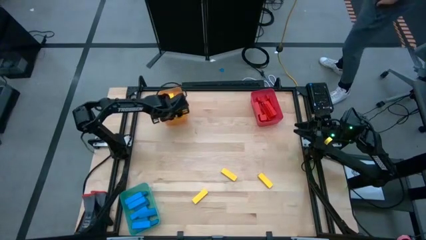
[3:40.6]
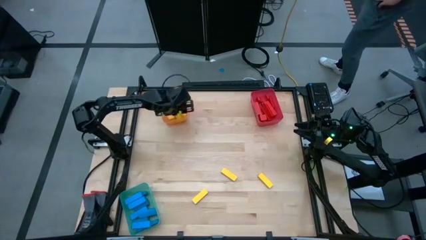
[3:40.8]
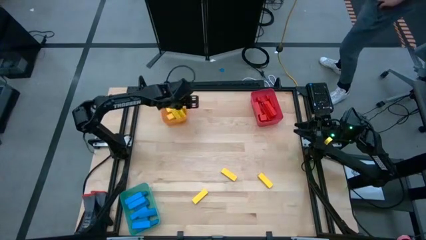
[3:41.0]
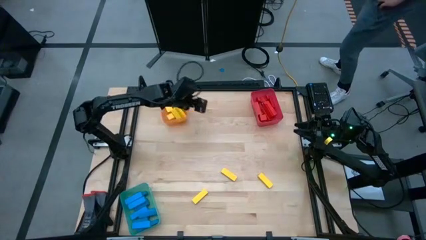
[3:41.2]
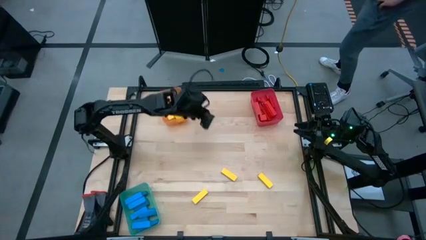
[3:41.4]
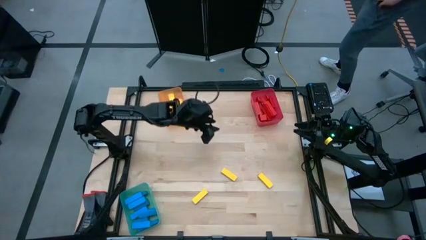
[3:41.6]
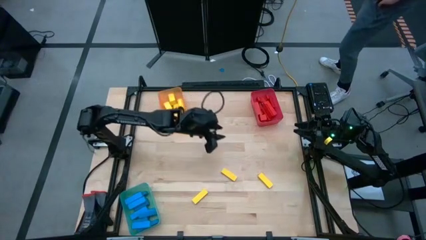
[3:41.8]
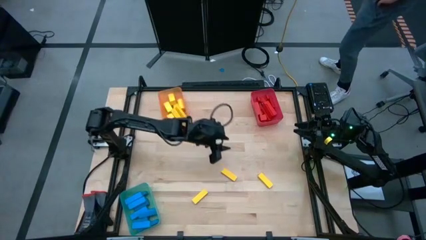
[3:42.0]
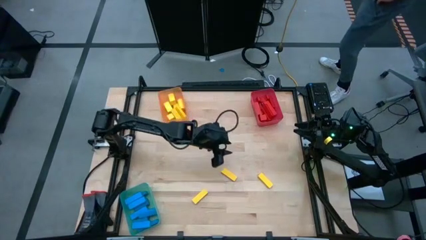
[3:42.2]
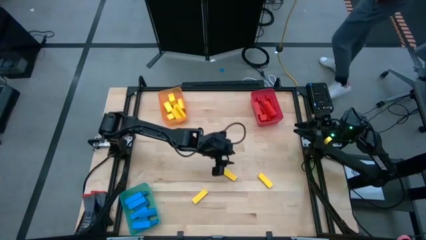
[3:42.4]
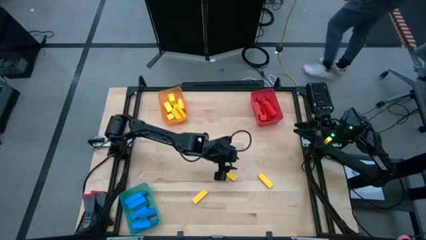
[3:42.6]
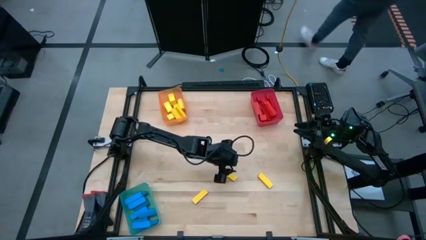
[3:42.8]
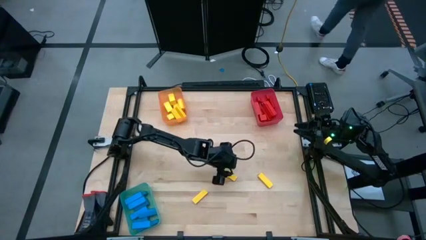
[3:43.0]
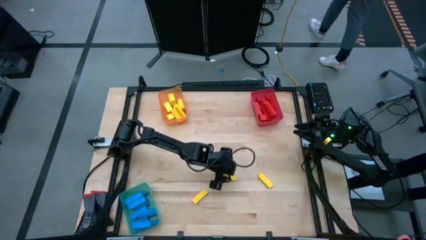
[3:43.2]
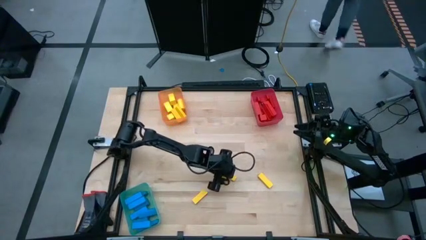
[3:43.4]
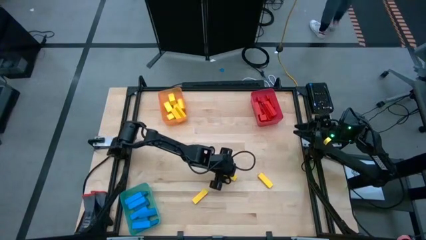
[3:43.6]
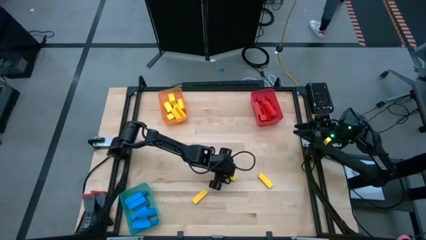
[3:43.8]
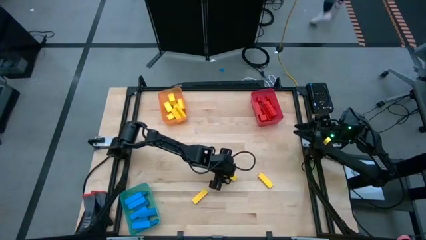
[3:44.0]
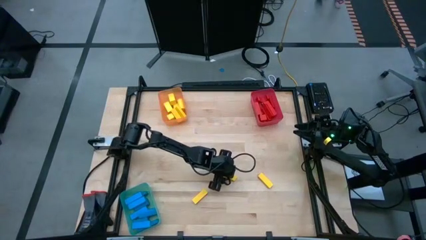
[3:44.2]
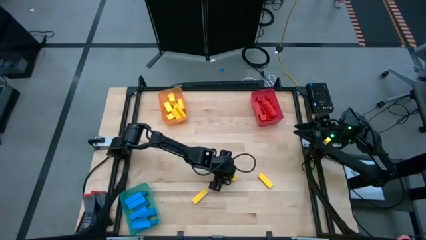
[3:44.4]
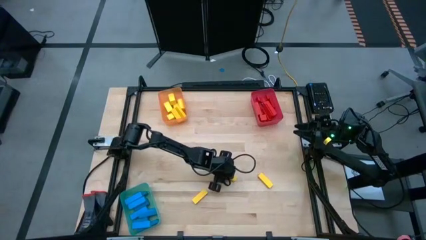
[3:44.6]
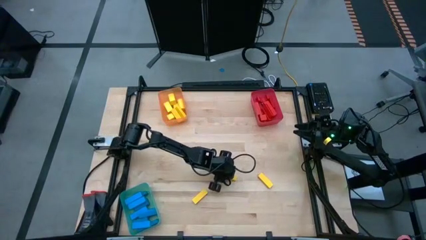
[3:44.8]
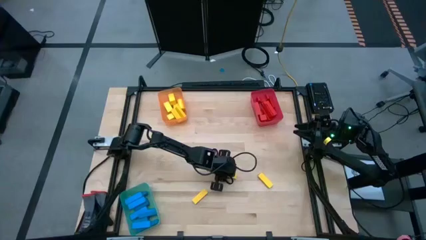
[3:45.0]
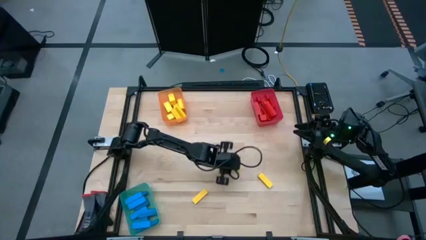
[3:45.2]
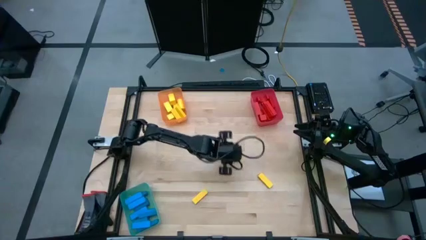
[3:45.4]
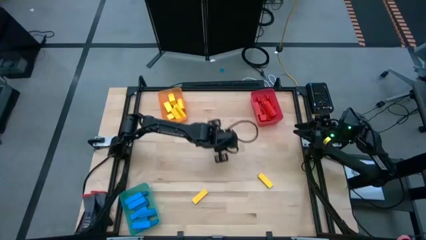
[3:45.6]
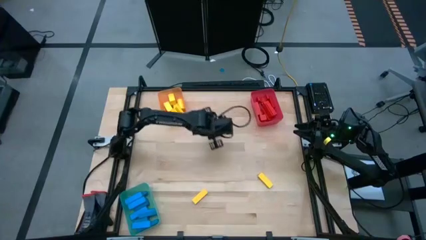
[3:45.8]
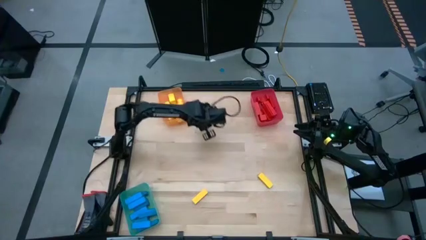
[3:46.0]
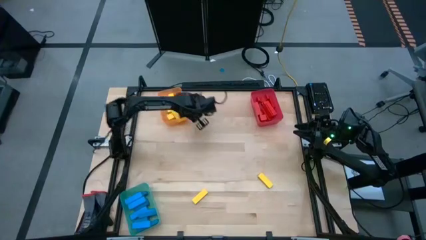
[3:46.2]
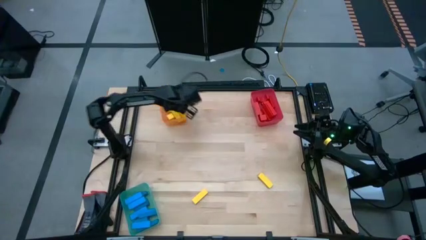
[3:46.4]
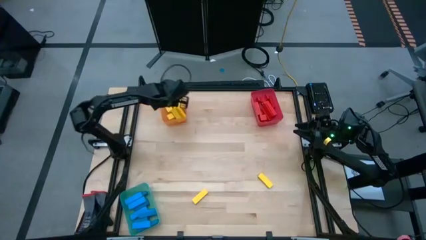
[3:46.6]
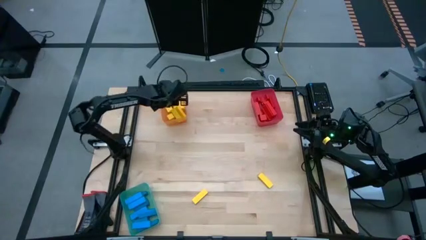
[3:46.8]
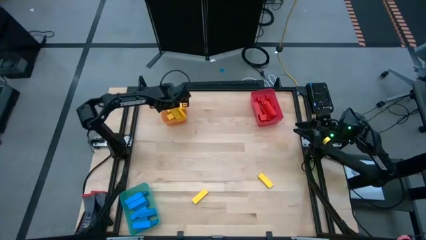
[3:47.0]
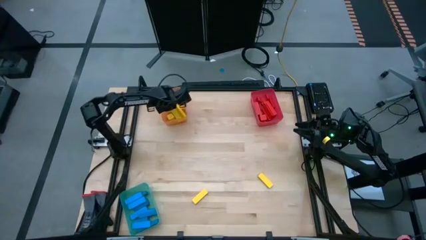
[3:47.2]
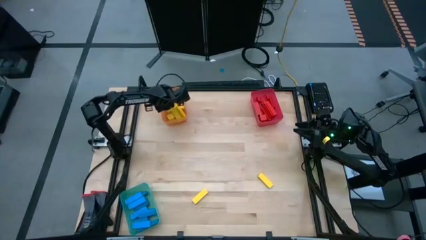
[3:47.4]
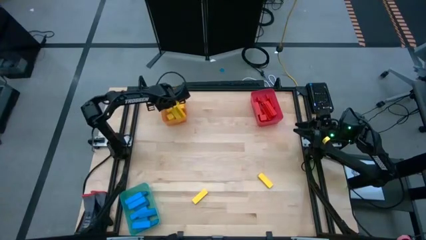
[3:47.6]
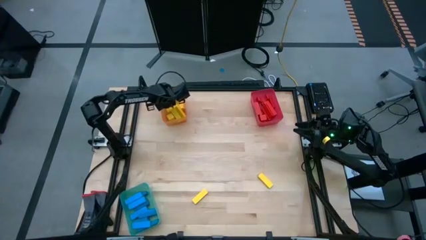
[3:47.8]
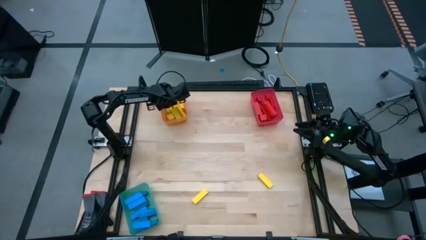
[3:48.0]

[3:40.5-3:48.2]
Task: Sort blocks
Put the yellow block into the orange transparent bin

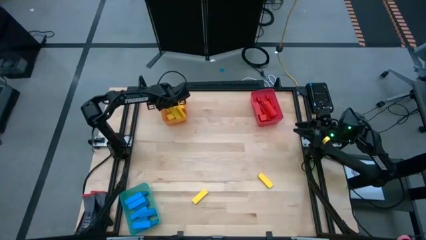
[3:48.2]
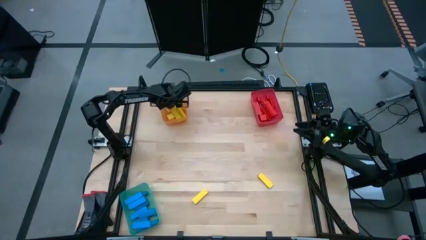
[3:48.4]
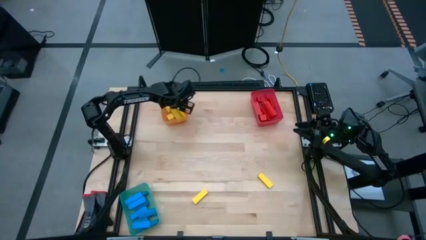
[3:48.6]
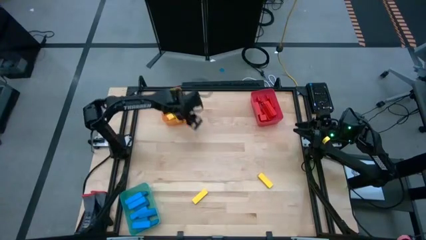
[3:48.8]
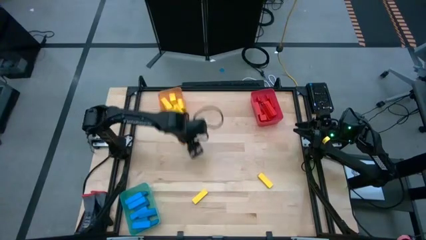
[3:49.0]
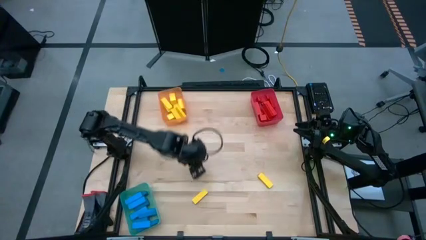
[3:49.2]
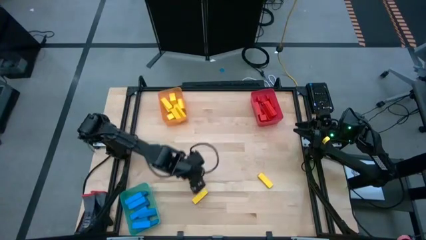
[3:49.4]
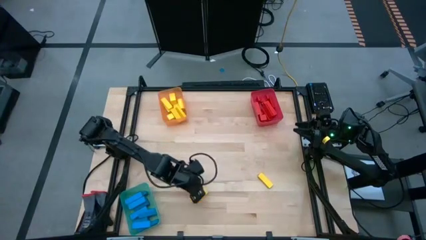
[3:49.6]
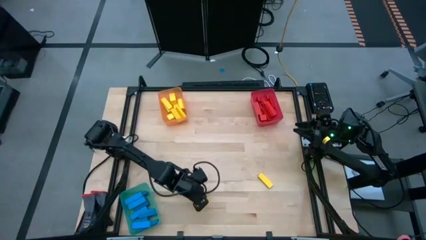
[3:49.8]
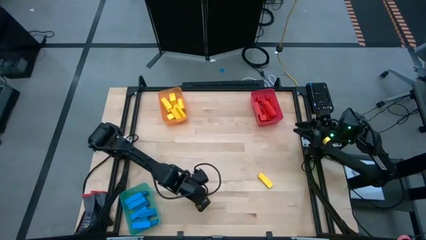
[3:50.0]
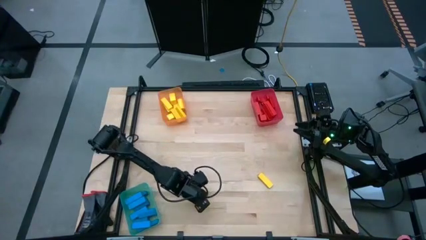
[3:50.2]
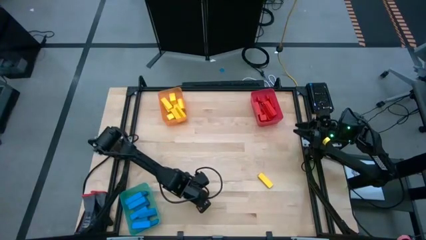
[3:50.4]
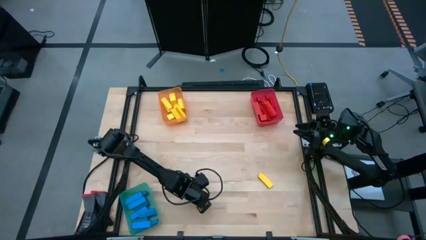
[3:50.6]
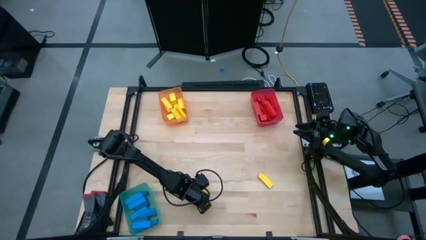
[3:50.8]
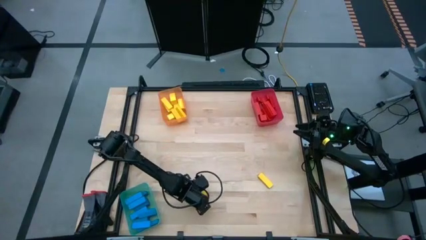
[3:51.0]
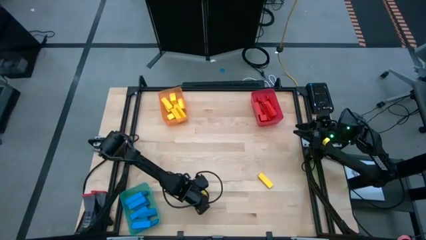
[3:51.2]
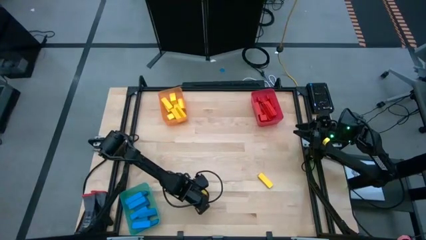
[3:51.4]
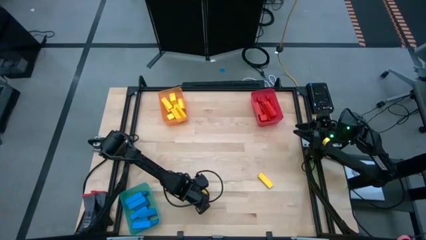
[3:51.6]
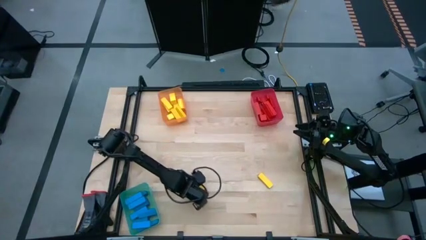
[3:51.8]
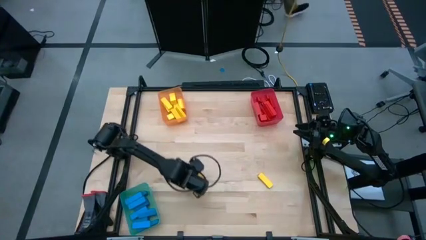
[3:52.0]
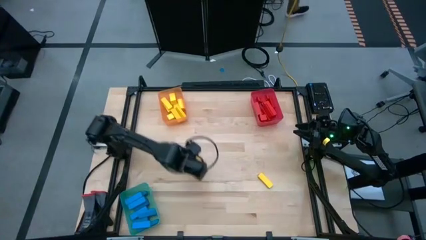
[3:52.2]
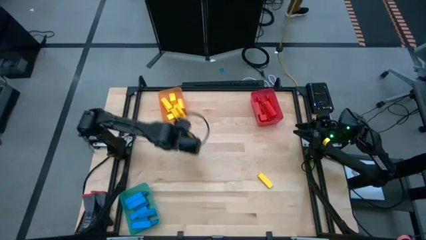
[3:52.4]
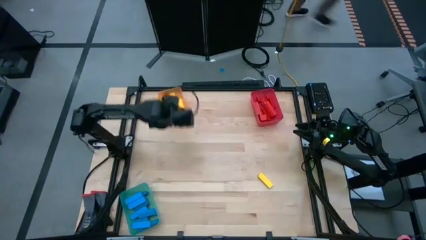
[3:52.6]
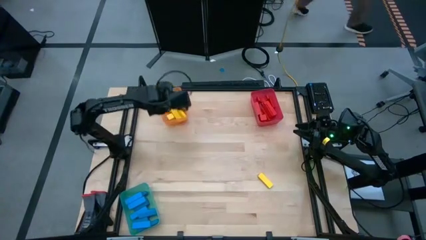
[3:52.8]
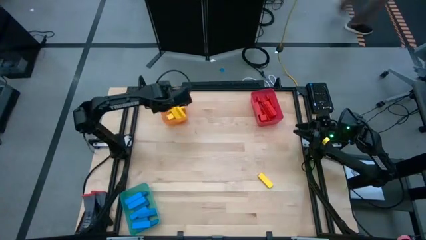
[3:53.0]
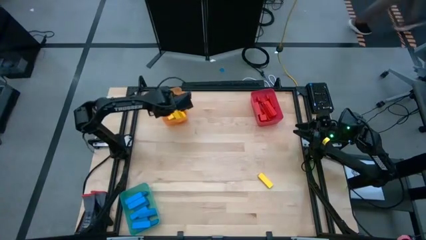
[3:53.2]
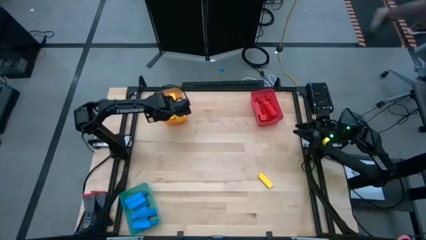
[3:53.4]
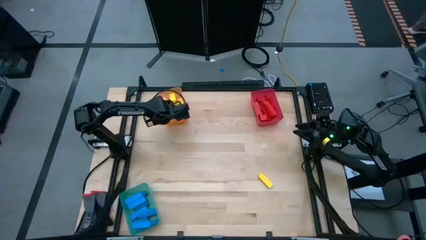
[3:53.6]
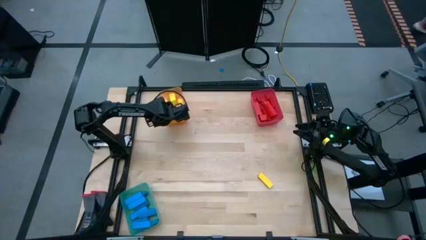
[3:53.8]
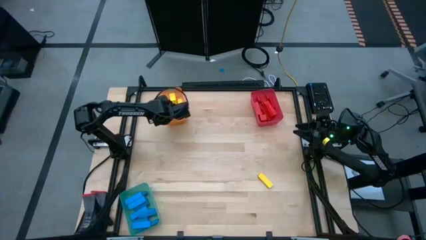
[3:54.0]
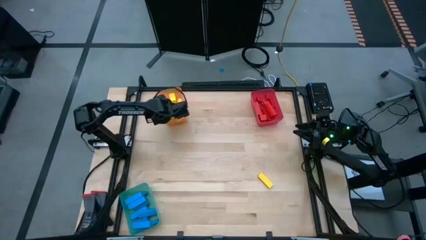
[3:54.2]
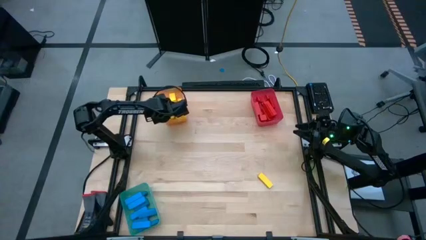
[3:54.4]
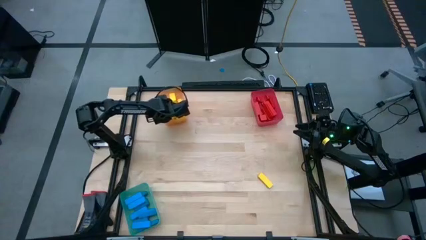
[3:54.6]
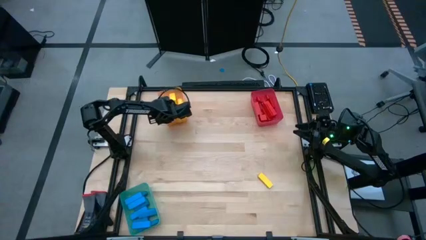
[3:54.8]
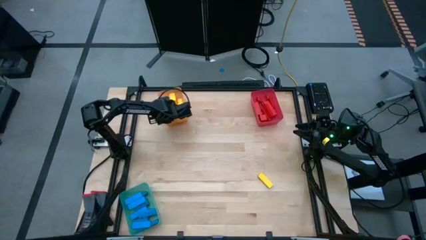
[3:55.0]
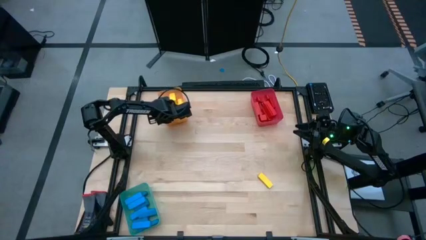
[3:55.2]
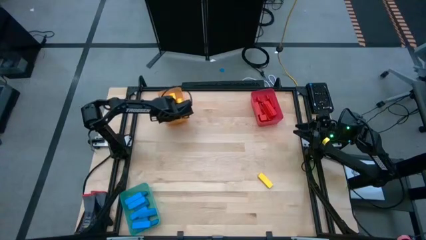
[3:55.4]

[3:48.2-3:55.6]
Put the yellow block into the orange transparent bin
